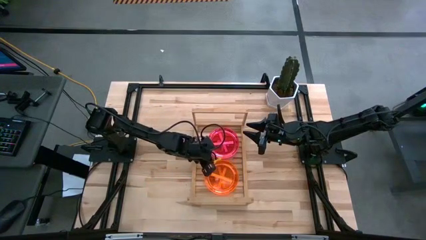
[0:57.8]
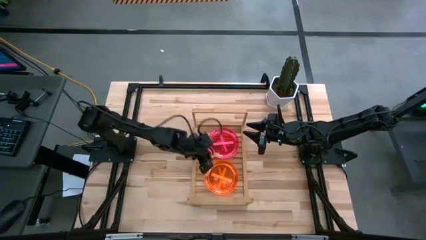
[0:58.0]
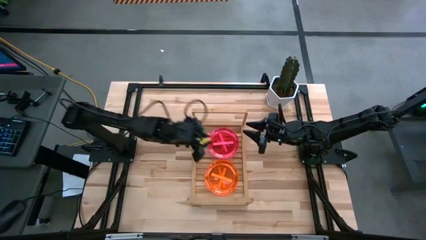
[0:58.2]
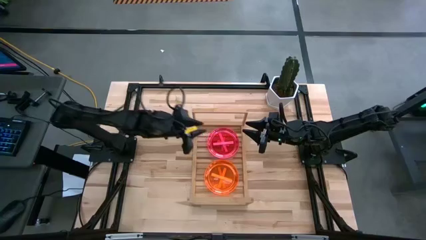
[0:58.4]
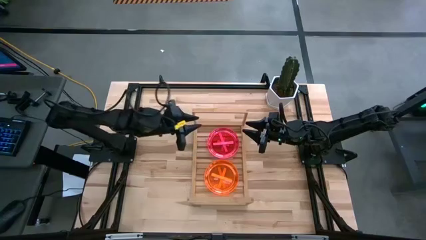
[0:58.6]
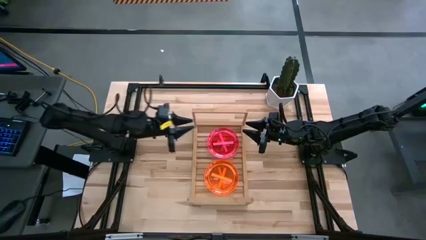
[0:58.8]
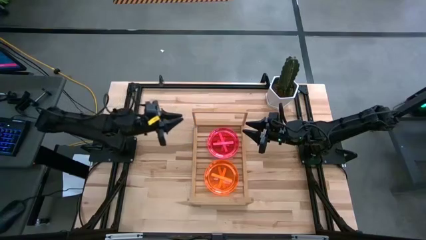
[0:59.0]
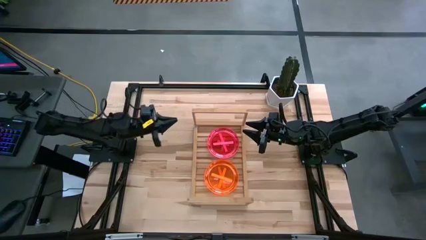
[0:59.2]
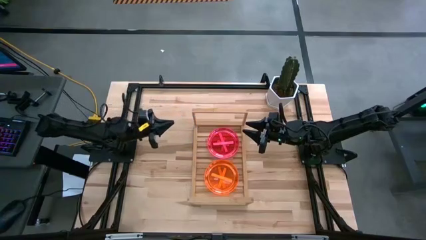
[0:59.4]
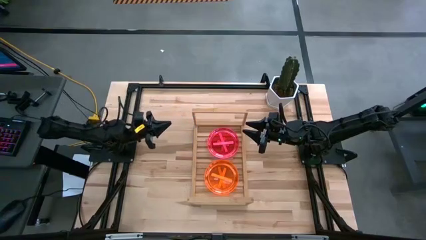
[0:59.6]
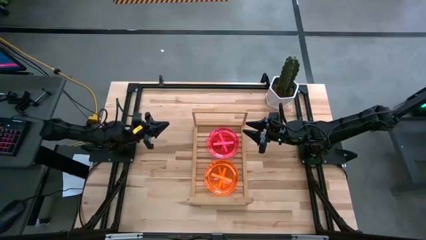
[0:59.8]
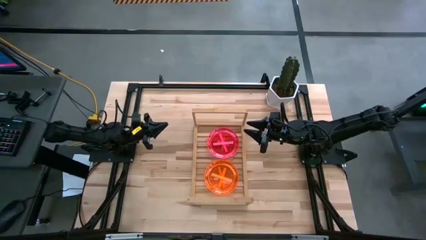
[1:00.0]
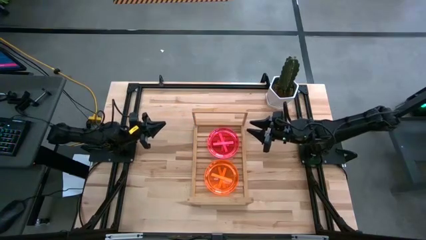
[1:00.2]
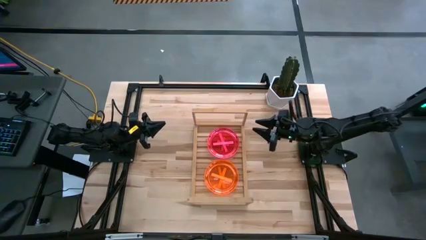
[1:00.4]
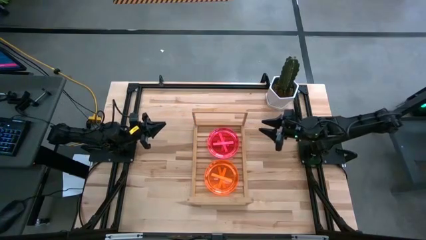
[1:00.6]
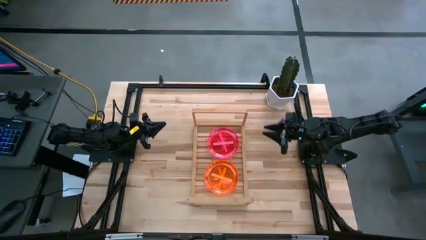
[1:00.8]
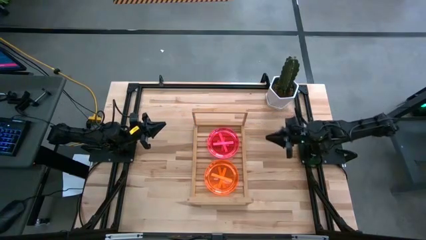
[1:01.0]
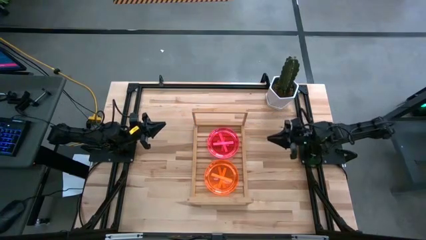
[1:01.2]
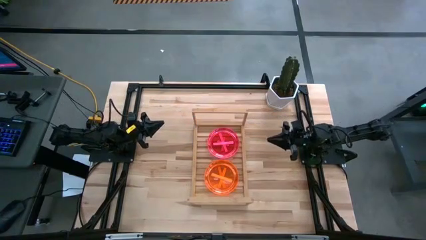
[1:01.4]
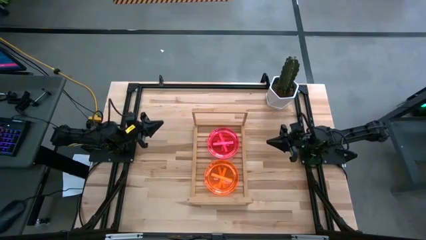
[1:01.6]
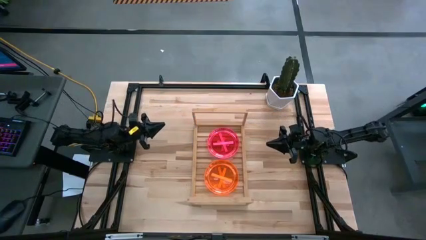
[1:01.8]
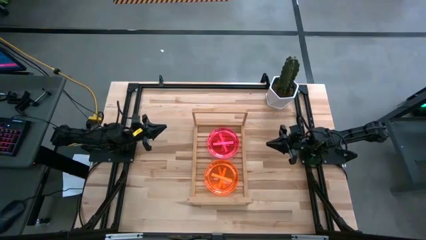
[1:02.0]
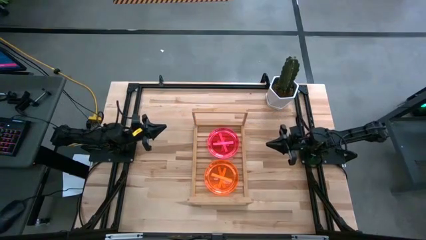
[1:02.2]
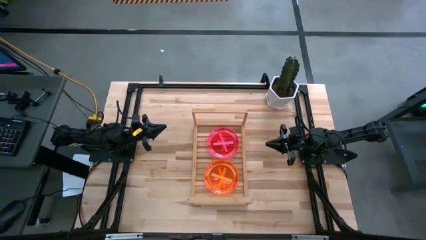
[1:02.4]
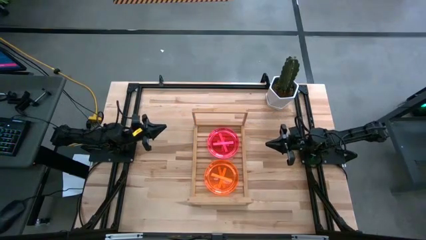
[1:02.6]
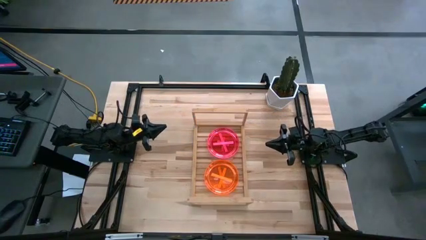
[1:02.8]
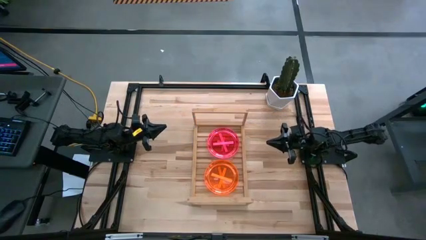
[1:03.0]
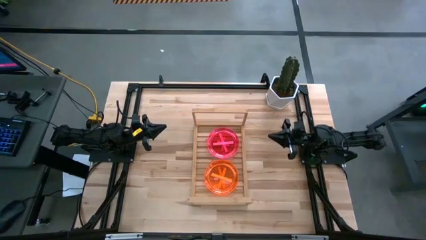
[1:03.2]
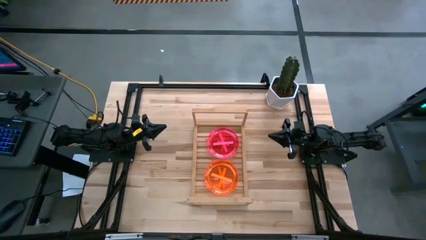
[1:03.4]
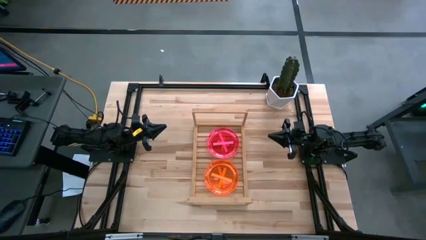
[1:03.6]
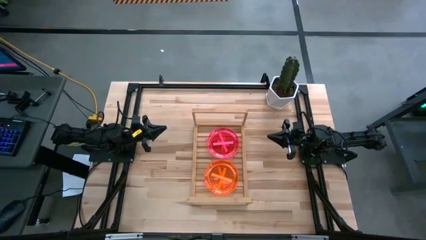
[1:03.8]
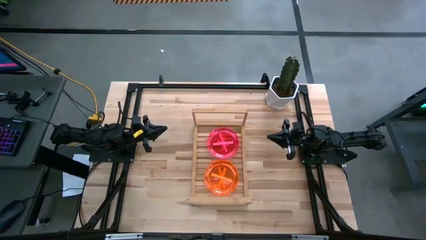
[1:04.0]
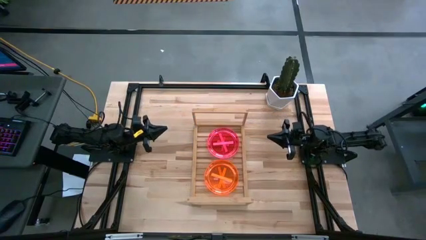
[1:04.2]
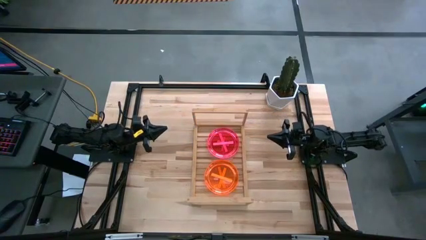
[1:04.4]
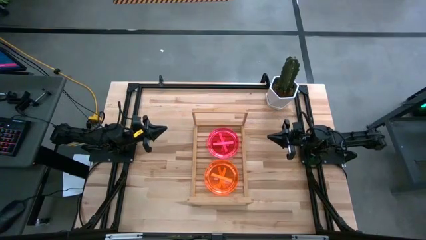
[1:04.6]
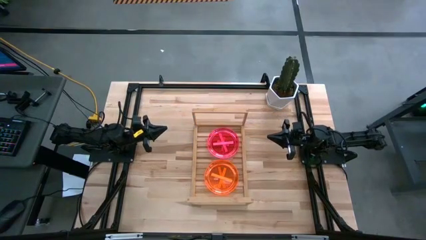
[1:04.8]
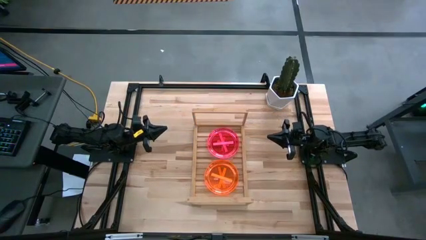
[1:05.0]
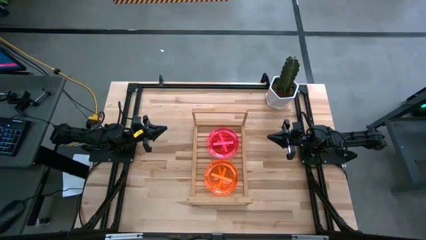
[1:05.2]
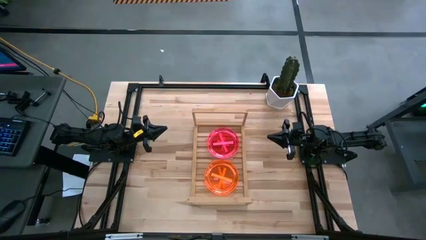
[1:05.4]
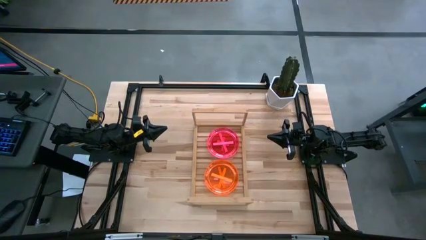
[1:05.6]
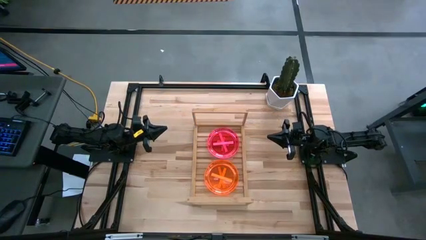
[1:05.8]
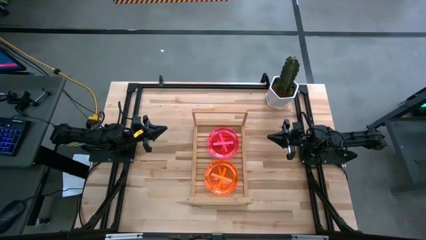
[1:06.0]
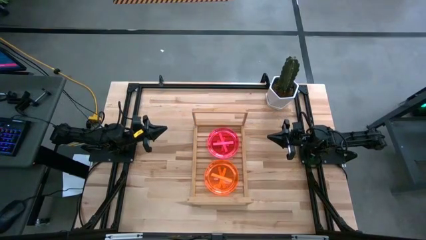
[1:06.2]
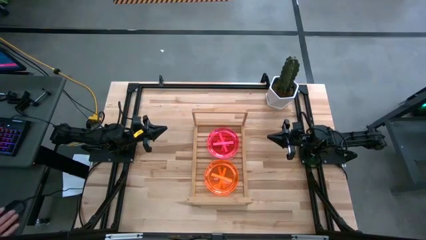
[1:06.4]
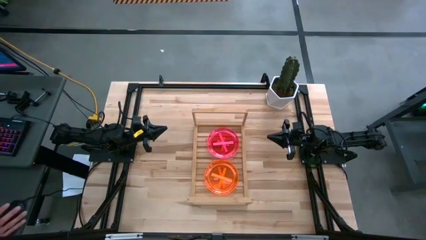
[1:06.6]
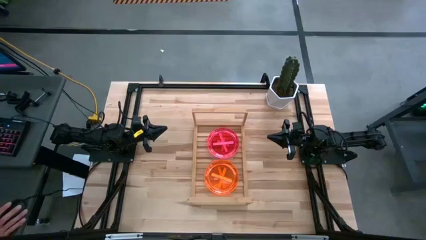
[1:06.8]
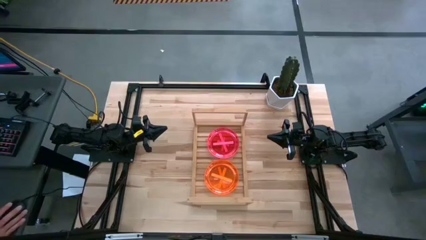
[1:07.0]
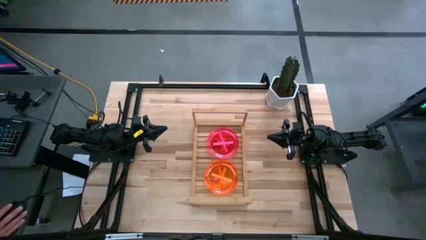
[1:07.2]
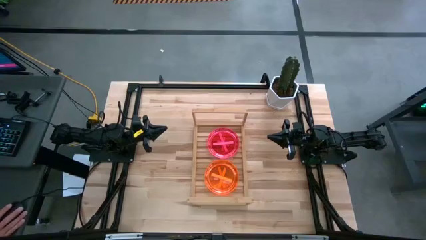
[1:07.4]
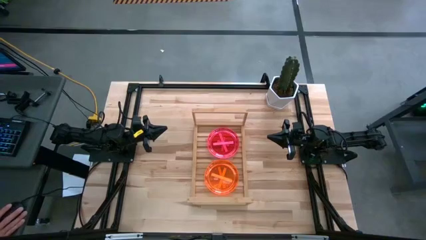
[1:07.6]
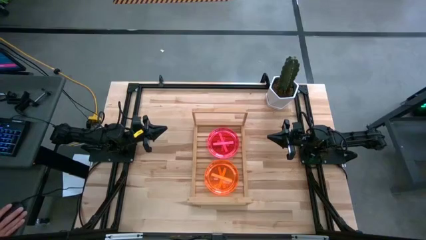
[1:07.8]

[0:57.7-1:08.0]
Task: Place and stack plates onto a shelf
Return to Home Position

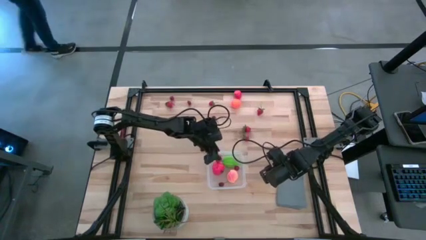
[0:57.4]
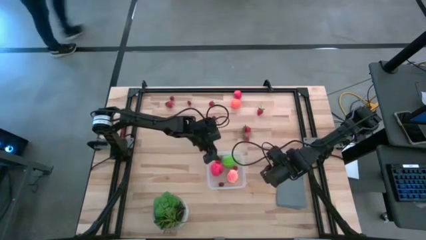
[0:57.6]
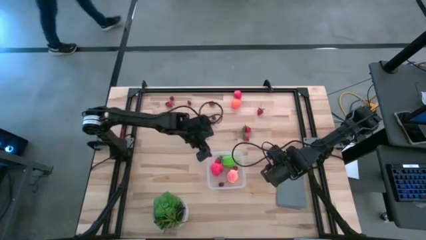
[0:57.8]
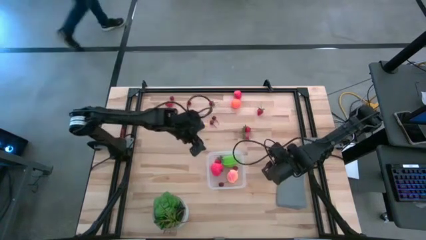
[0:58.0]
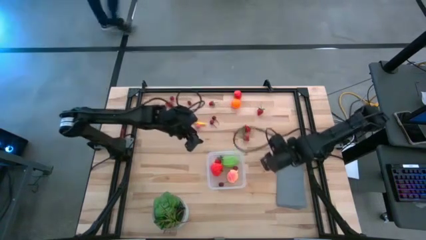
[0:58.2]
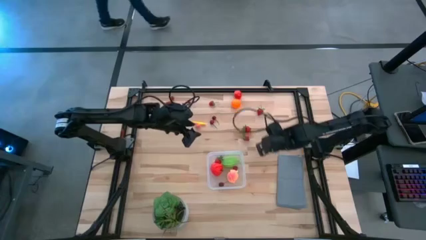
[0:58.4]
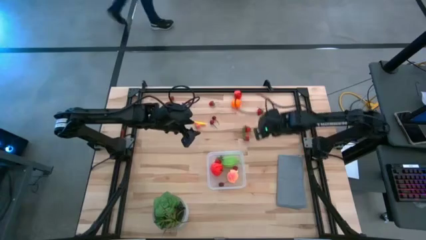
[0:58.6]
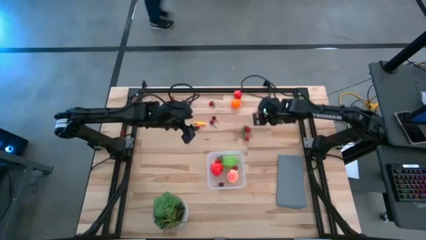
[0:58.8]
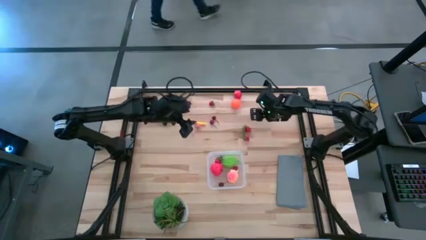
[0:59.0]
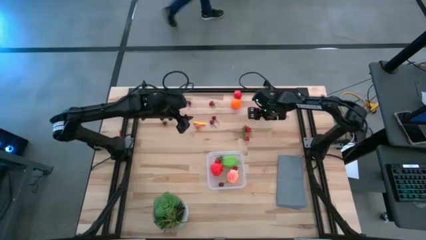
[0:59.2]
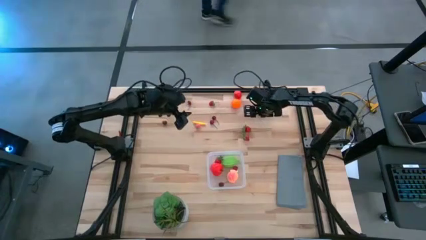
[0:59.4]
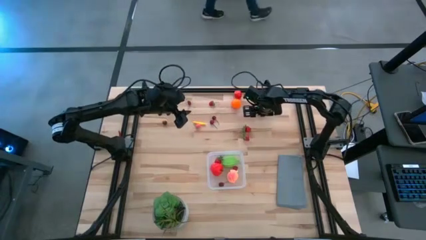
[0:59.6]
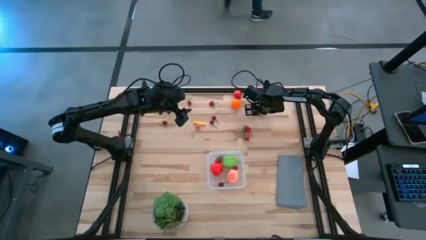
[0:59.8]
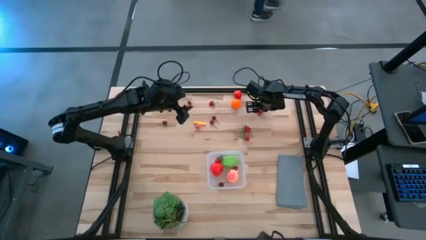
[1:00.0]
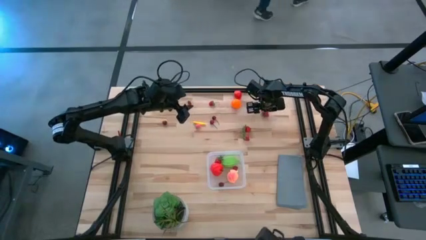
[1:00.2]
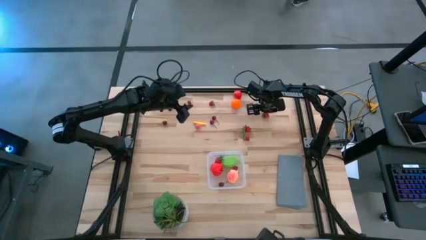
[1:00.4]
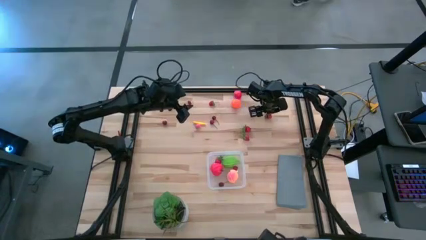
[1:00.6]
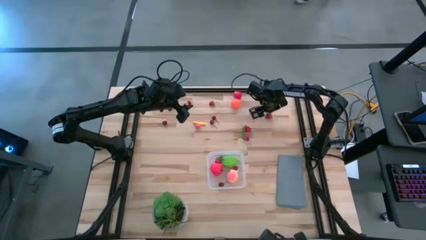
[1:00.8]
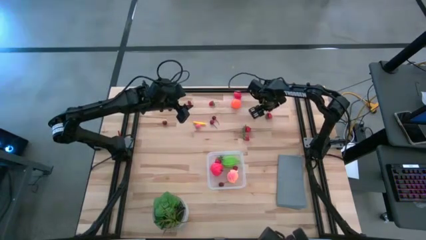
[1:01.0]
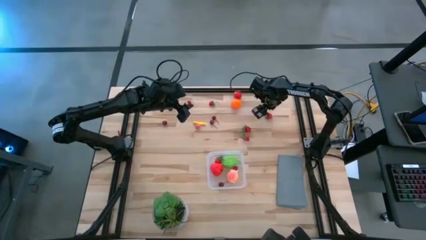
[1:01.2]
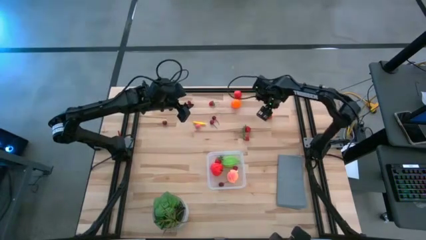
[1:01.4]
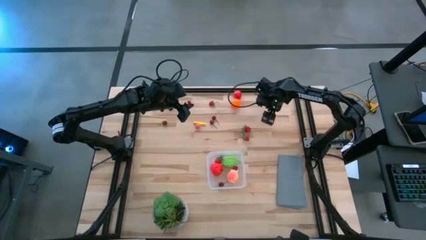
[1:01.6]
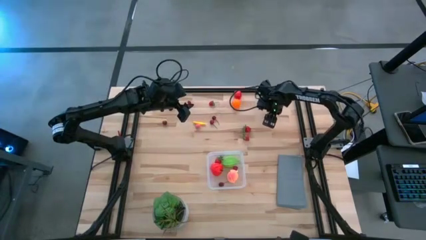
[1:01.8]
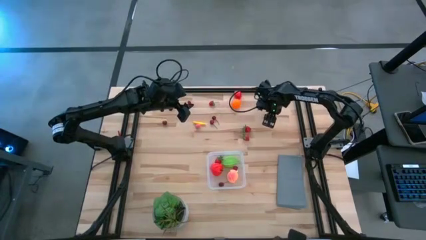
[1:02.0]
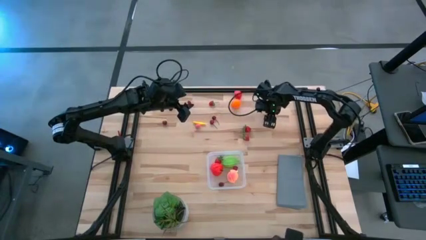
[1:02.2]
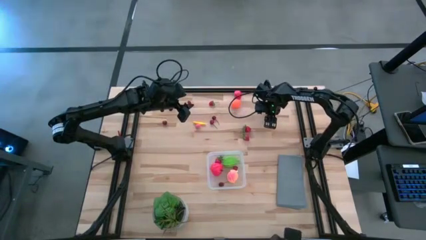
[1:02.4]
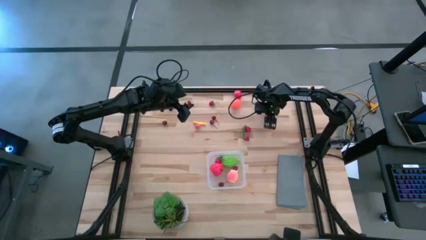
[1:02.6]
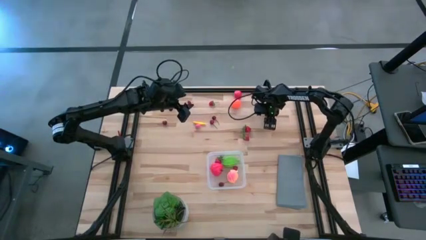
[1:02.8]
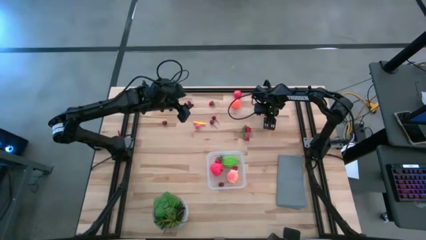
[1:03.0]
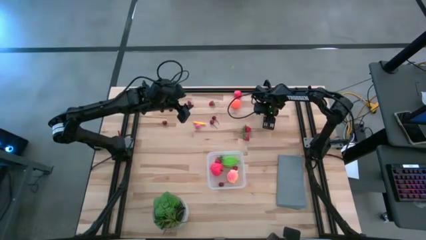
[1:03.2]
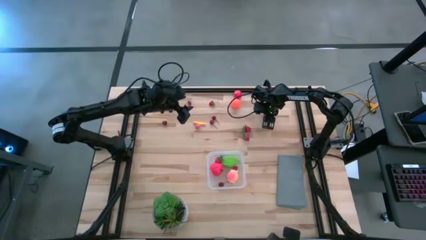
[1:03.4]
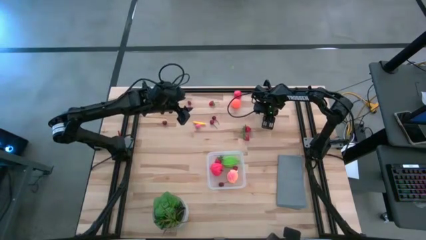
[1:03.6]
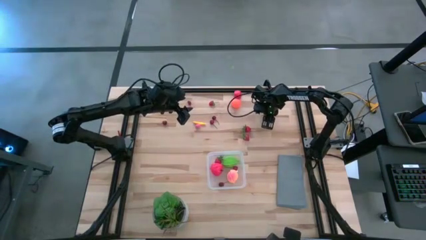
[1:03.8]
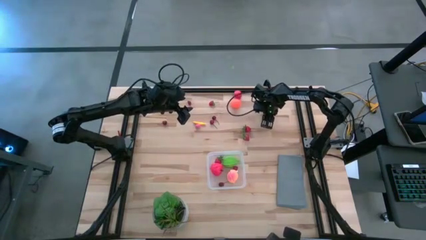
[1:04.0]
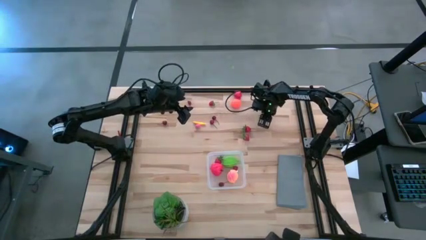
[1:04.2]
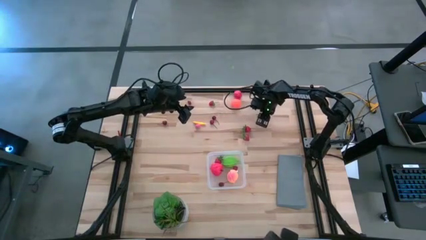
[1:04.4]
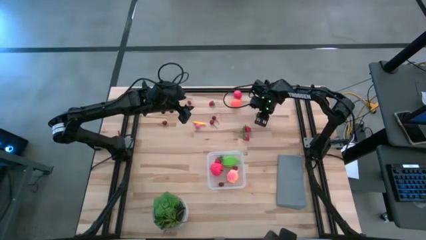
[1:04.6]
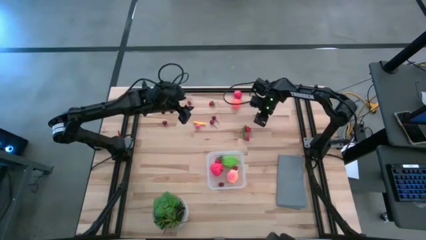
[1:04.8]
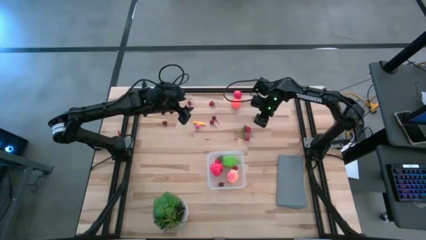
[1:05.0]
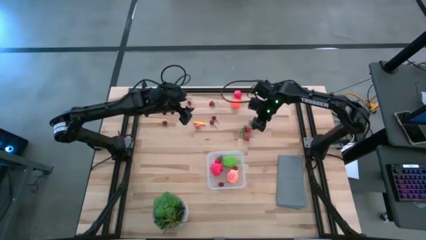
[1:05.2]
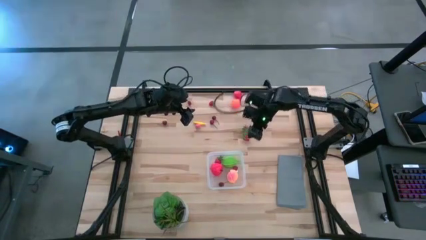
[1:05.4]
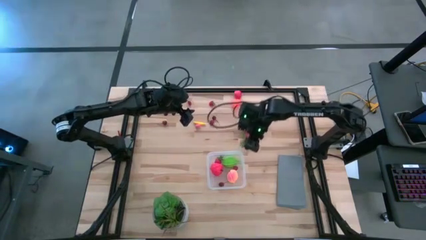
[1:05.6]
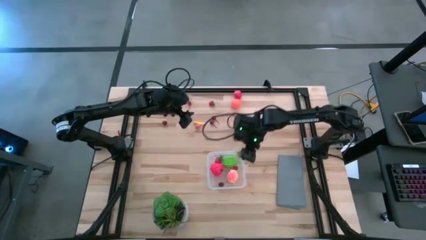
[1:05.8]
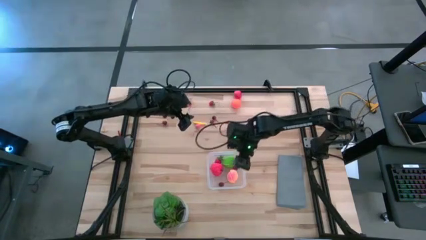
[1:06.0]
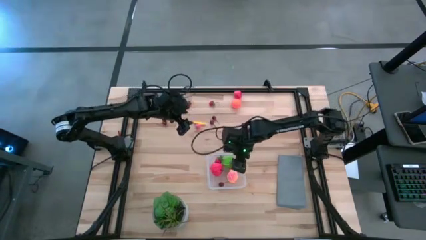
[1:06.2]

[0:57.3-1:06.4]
Task: Pick and placing Produce into tupperware
Put the red strawberry into the transparent bin
